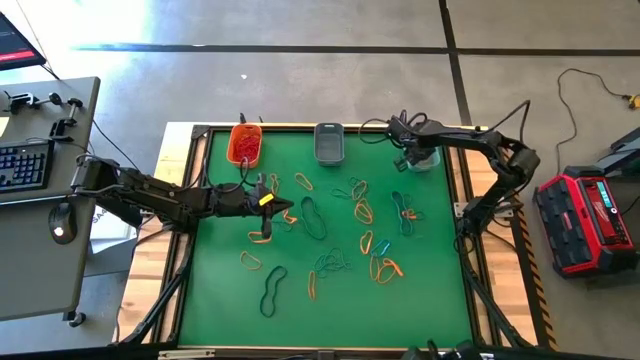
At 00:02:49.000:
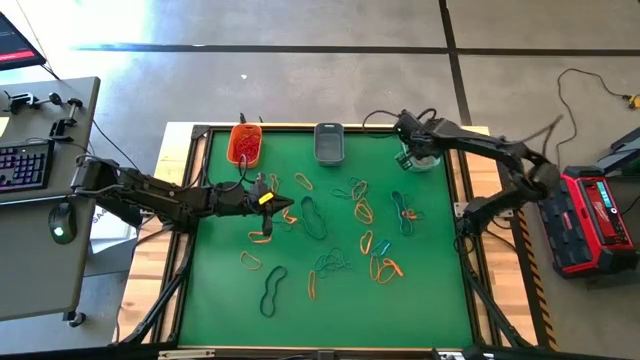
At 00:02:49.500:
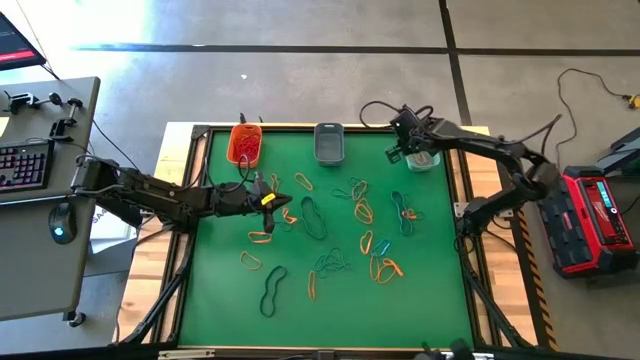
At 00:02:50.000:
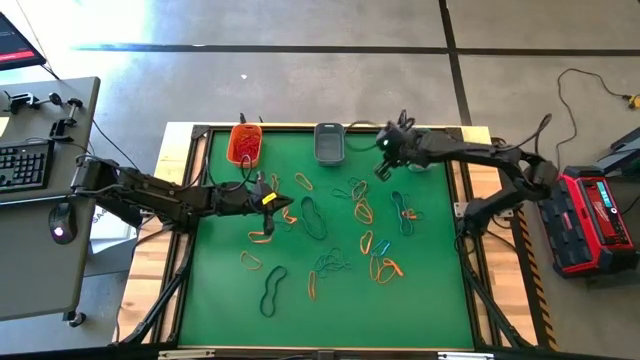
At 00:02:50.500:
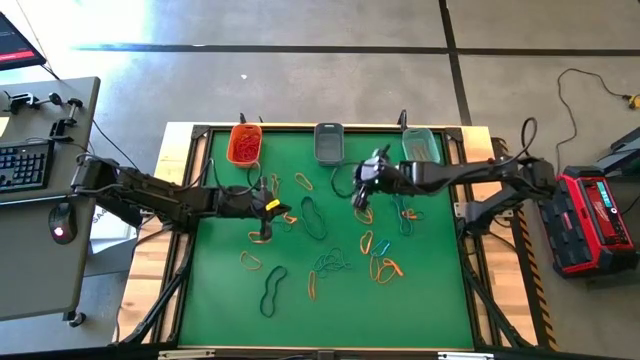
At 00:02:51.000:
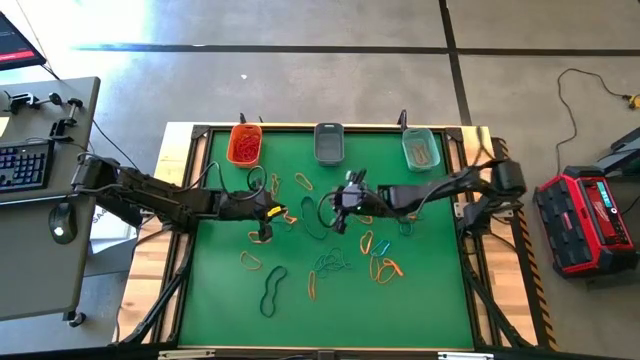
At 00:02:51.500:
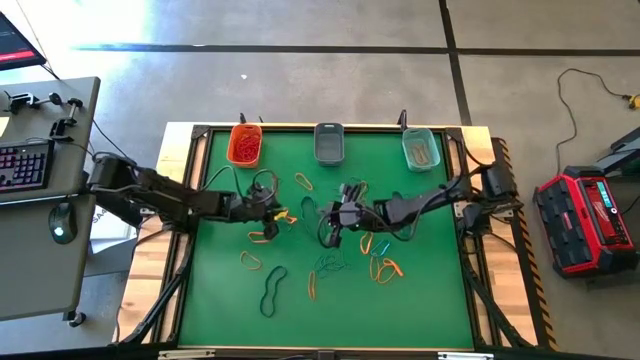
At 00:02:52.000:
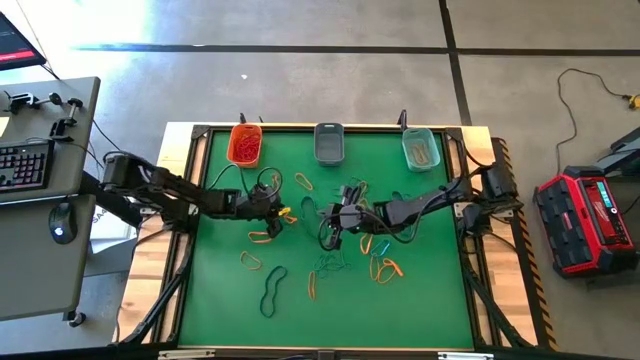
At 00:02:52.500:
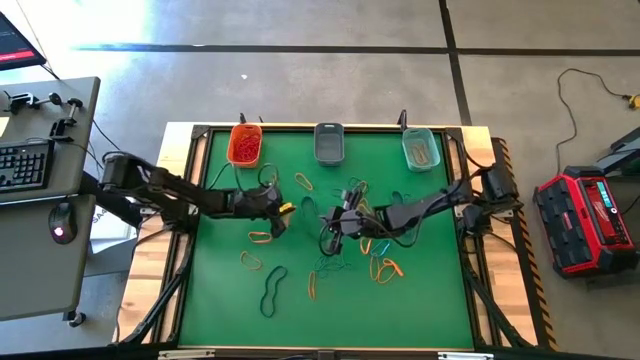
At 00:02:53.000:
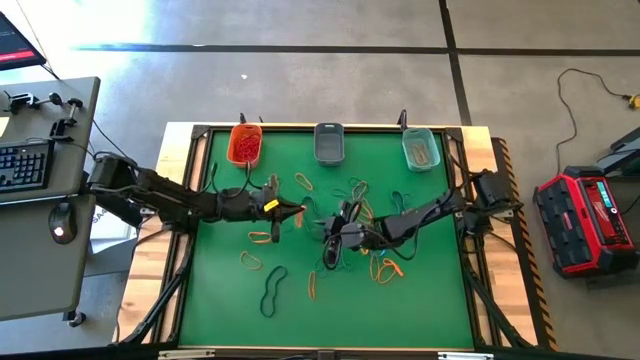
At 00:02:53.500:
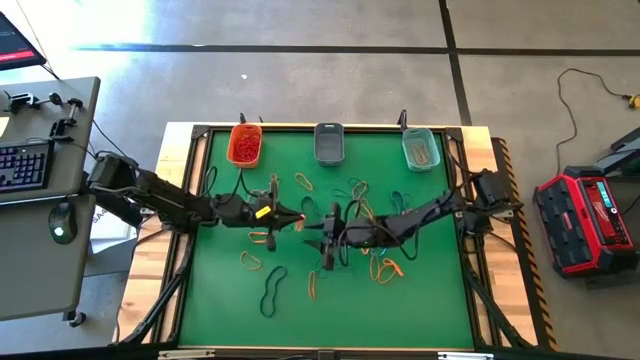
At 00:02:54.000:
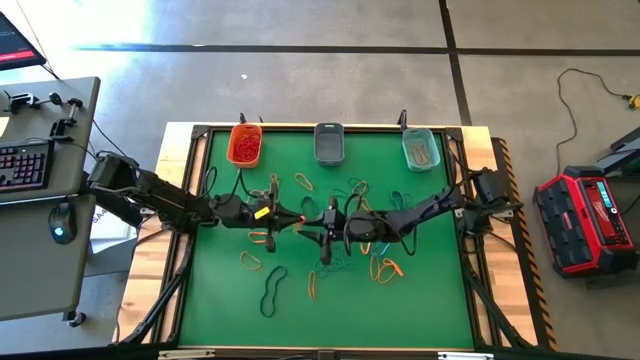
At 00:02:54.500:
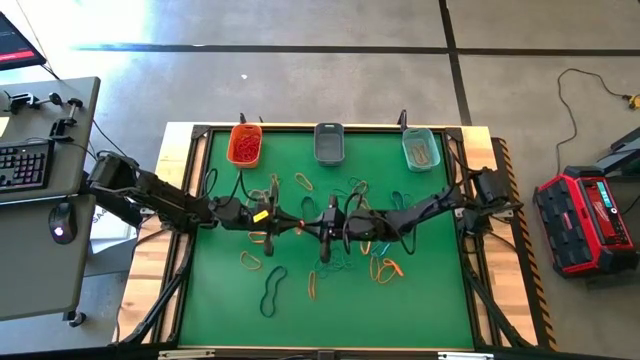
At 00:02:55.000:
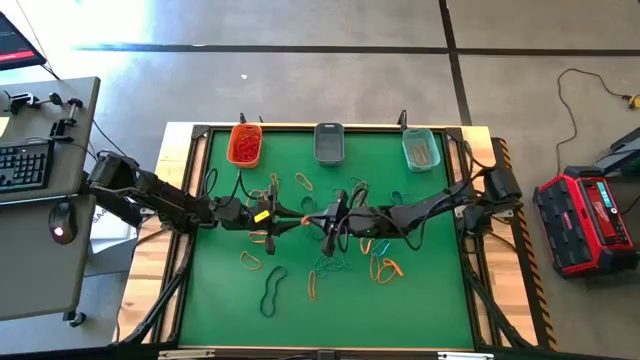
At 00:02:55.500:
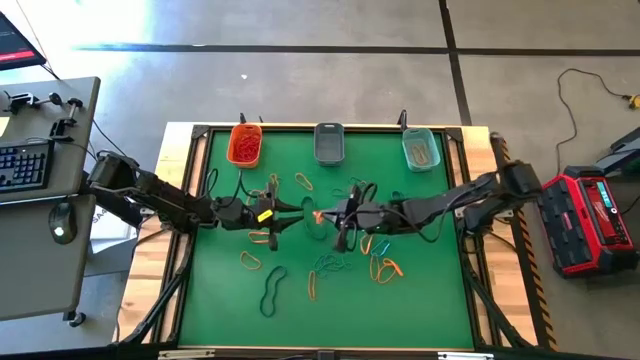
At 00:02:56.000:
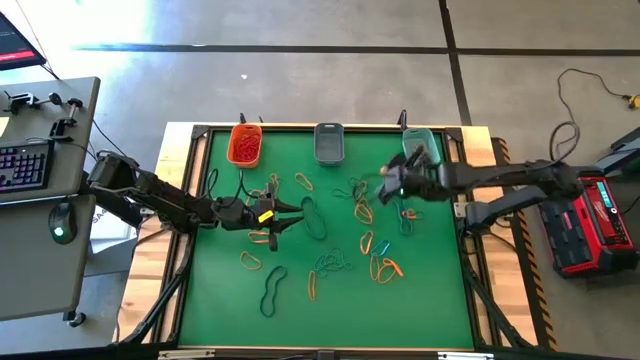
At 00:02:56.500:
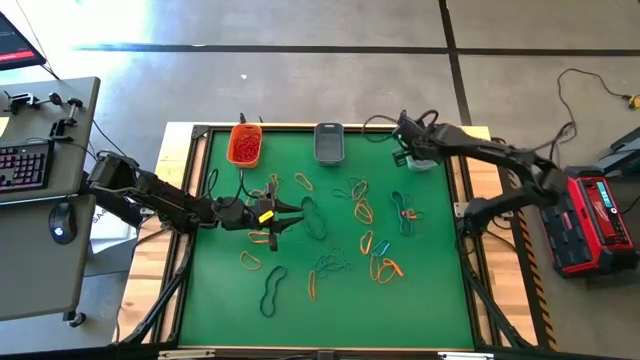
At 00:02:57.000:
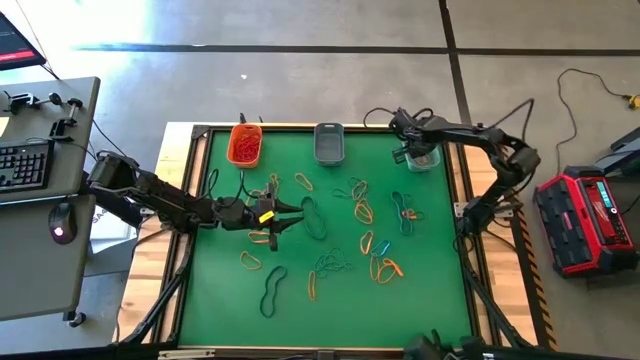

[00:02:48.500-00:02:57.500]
Task: Sort rubber bands into baskets
Put the orange rubber band into the green bin

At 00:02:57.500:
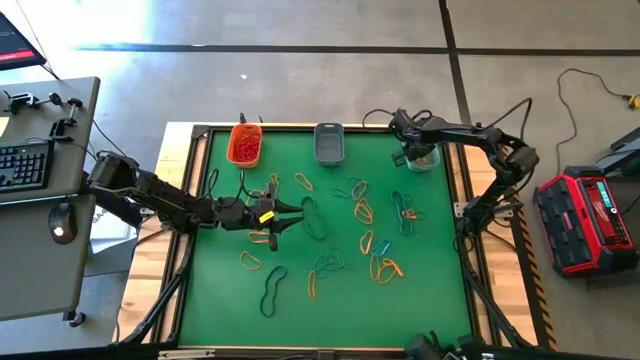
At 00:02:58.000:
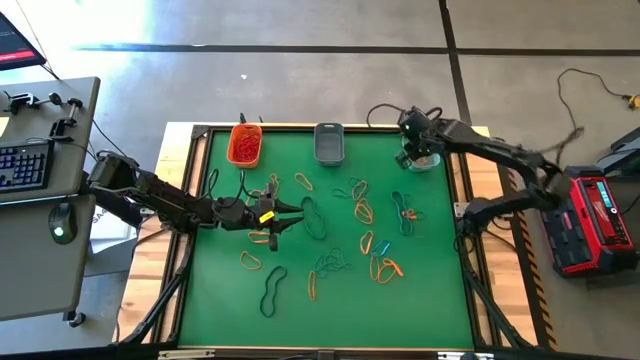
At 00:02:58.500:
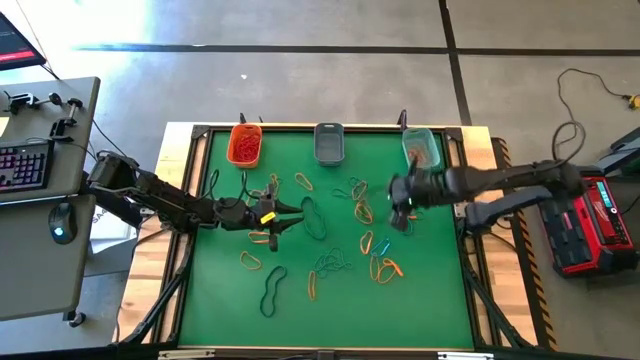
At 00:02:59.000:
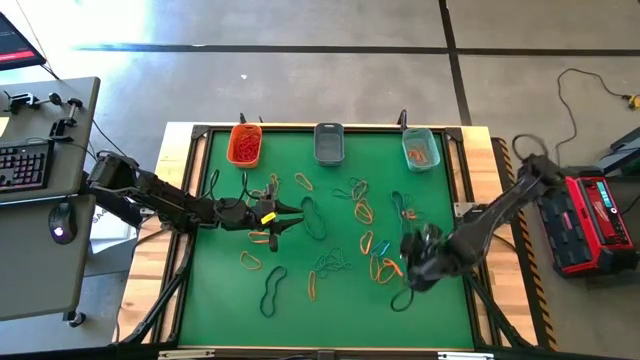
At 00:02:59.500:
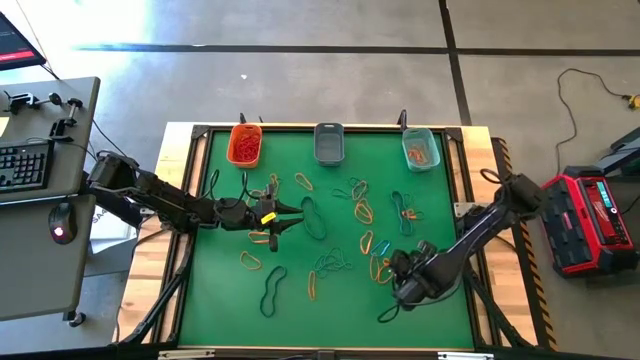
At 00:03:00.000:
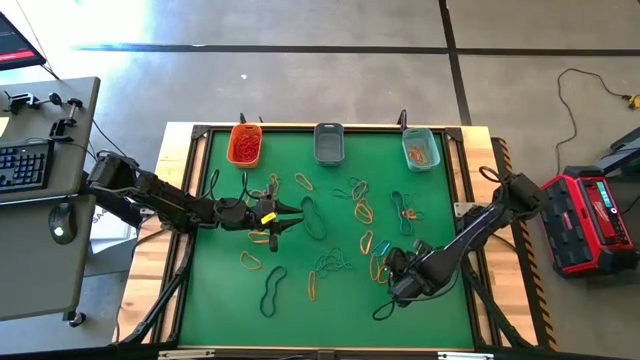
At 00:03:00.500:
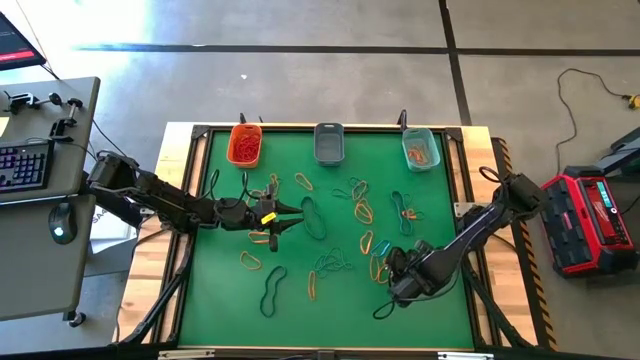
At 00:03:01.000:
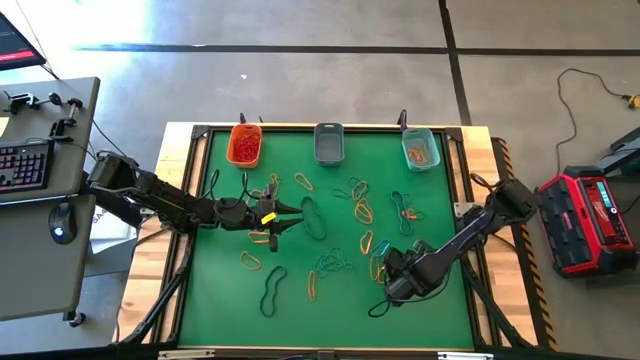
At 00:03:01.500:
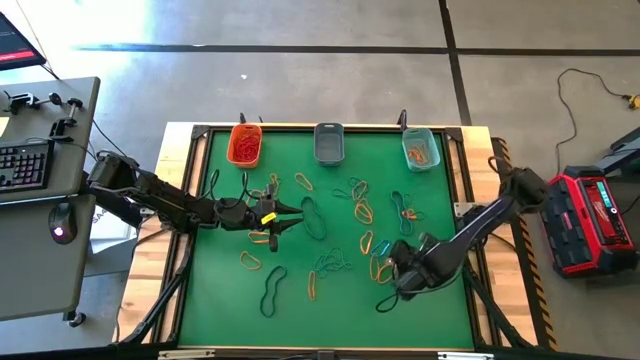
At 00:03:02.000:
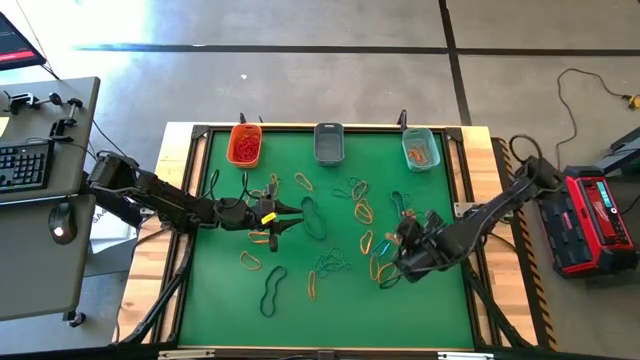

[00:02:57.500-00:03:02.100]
Put the orange rubber band into the green bin

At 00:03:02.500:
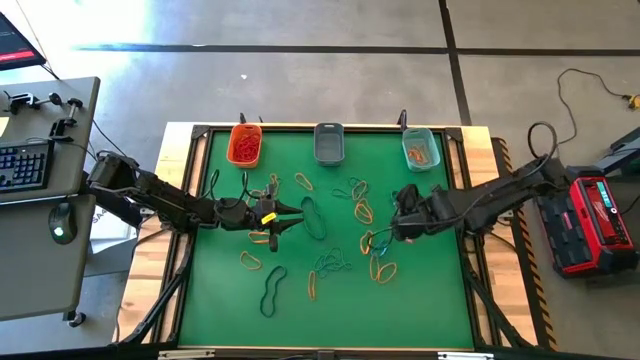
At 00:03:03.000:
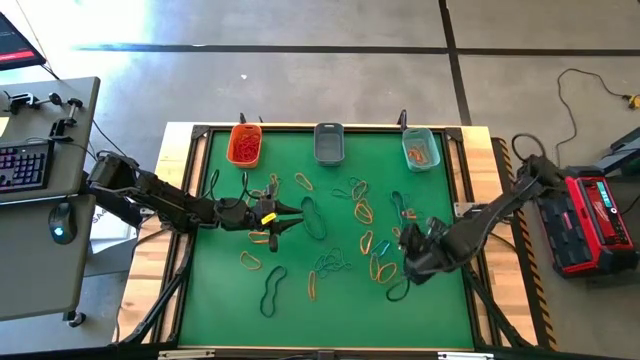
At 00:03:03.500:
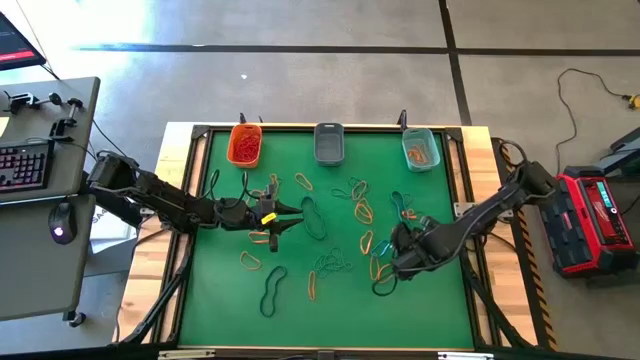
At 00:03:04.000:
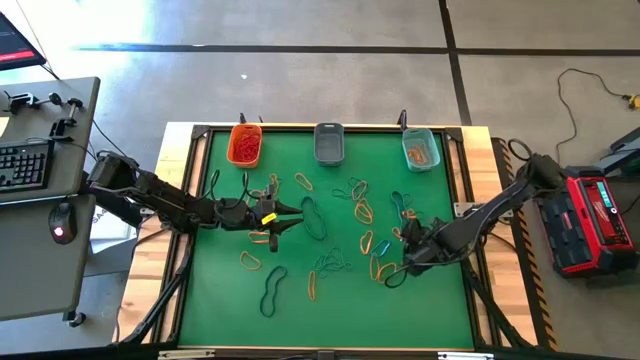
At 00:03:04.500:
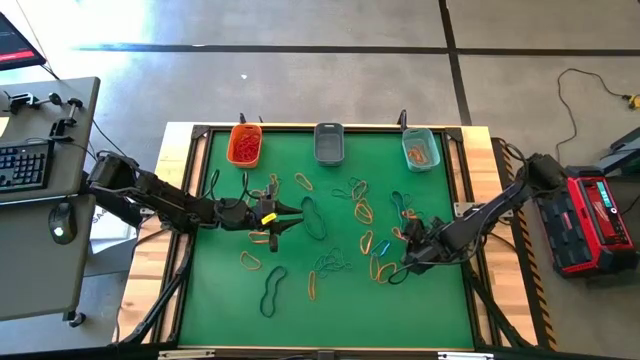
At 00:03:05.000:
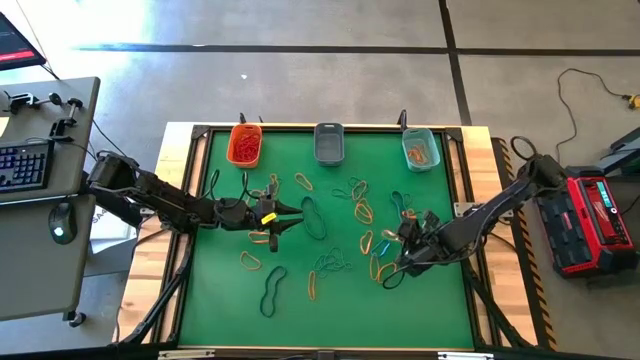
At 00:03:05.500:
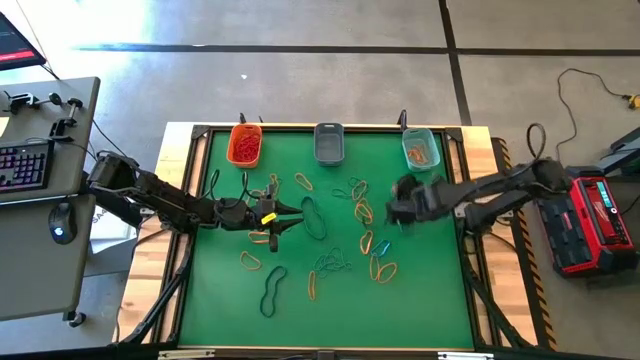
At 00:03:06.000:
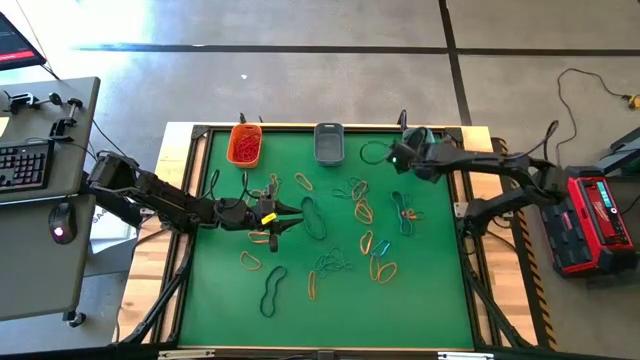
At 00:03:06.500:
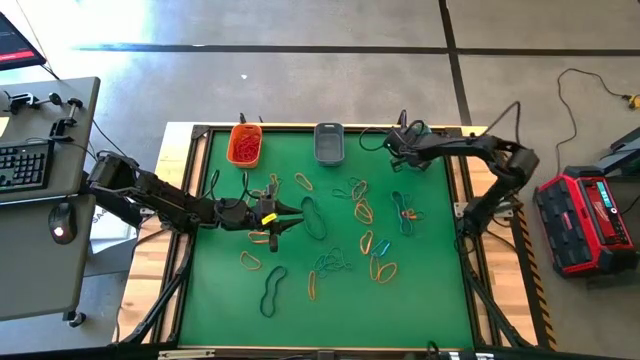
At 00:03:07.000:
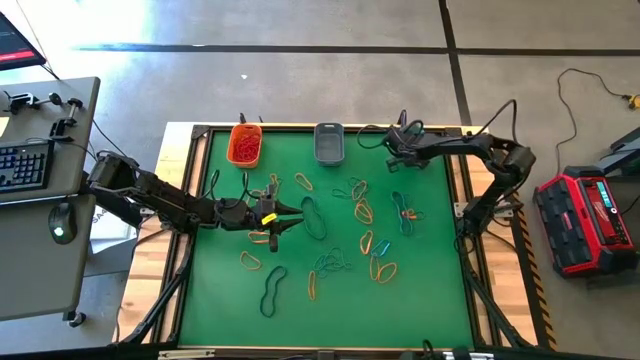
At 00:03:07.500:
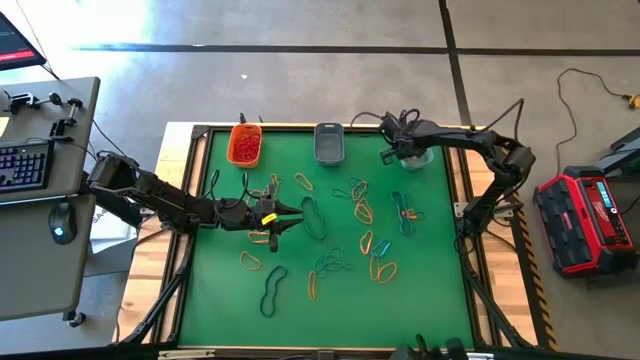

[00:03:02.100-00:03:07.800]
Put the orange rubber band into the green bin

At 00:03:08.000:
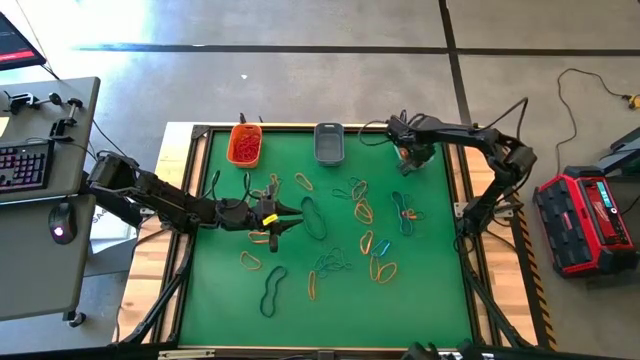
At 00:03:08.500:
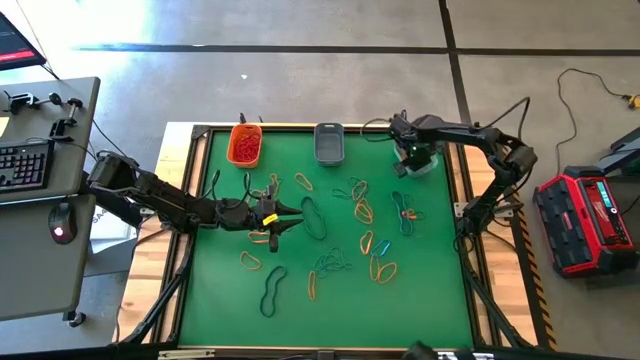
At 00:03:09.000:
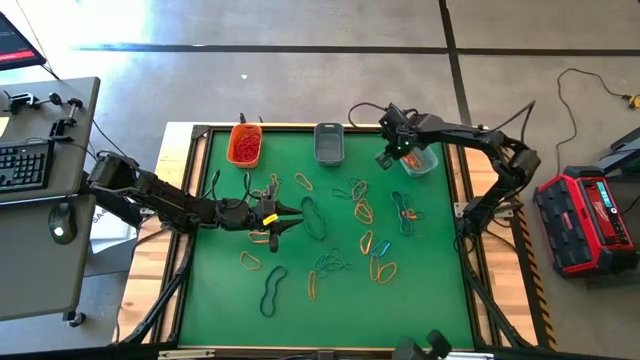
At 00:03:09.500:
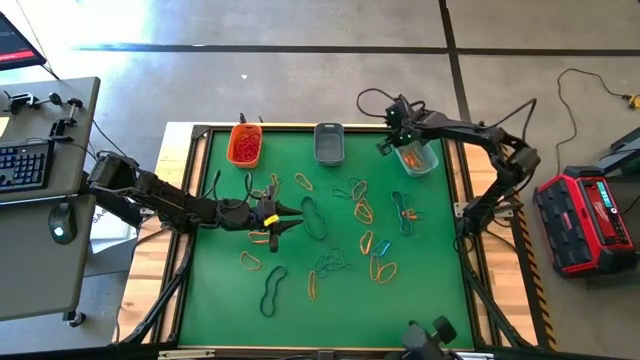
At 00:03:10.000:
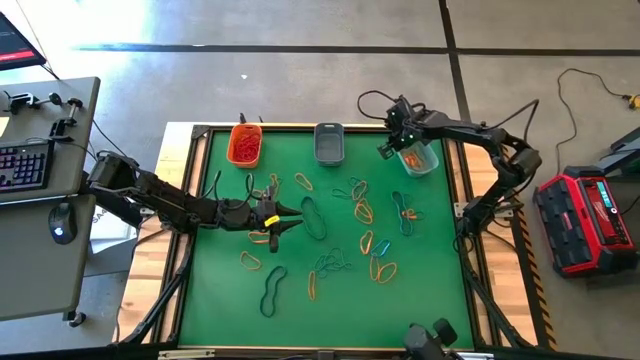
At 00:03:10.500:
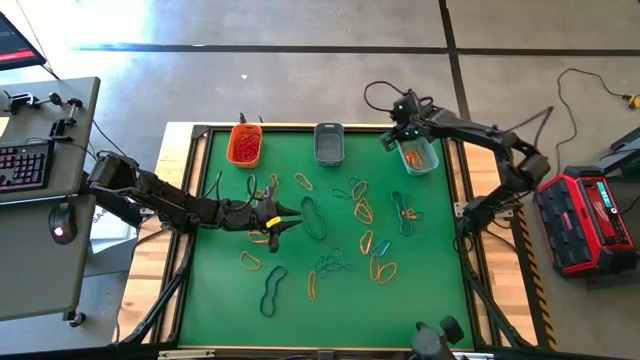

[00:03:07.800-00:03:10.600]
Adjust the green bin
